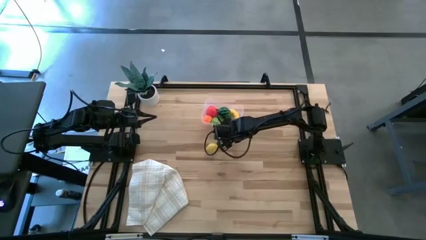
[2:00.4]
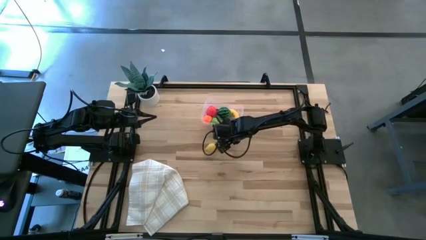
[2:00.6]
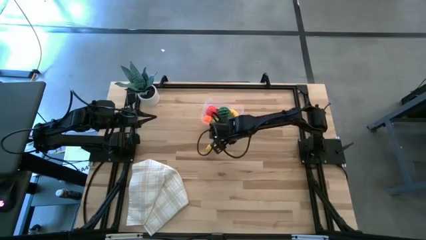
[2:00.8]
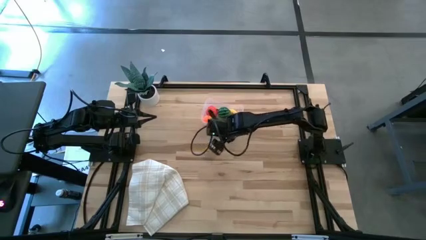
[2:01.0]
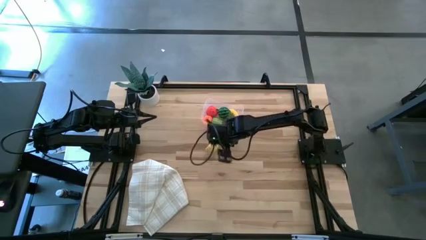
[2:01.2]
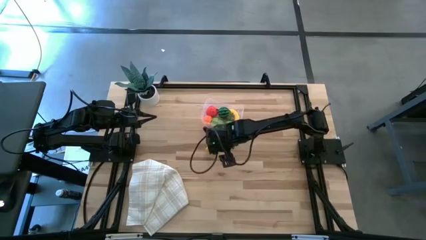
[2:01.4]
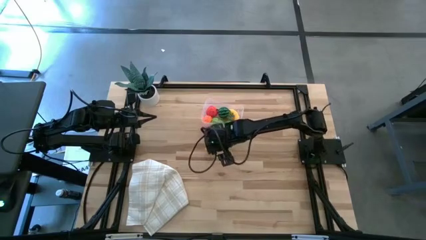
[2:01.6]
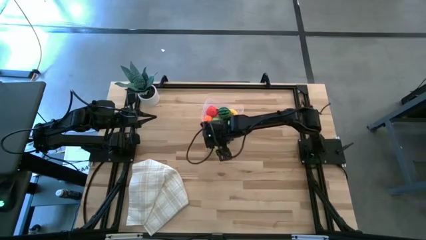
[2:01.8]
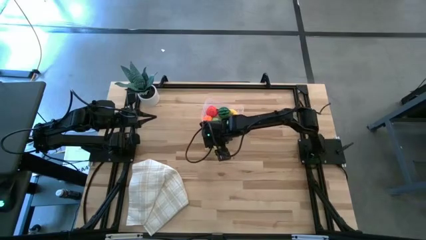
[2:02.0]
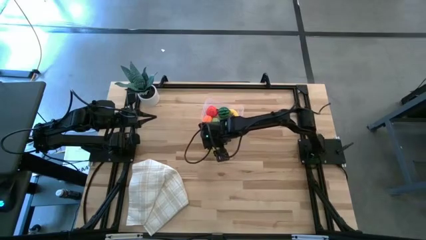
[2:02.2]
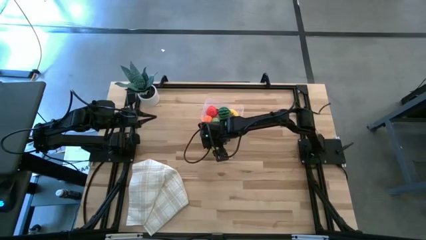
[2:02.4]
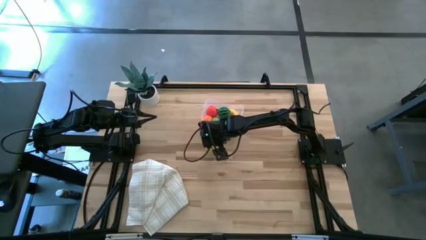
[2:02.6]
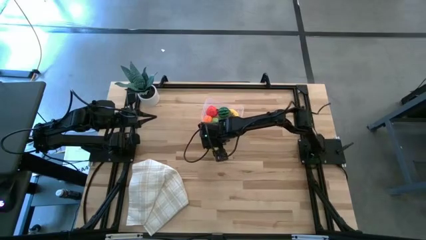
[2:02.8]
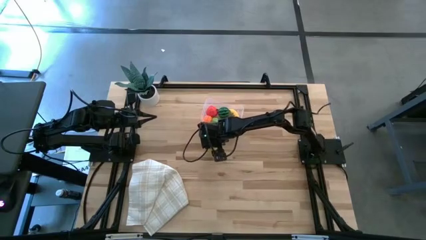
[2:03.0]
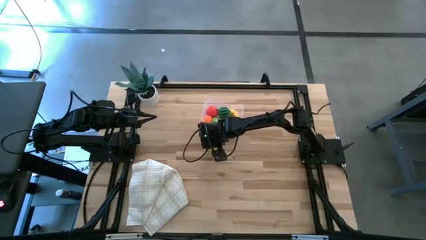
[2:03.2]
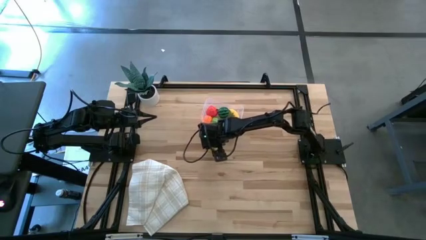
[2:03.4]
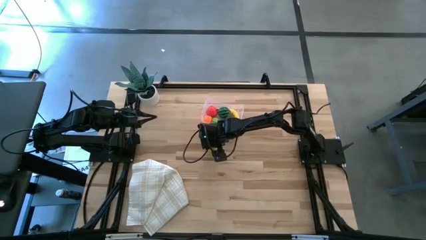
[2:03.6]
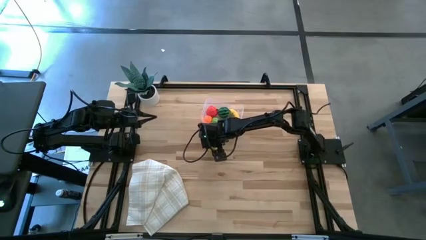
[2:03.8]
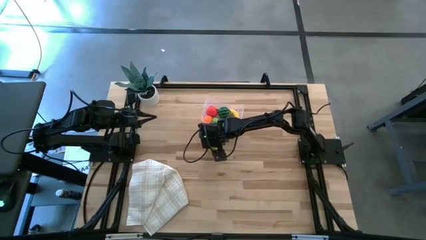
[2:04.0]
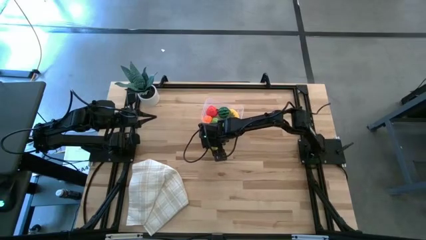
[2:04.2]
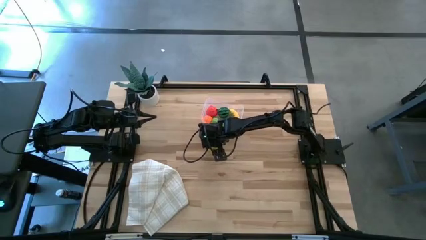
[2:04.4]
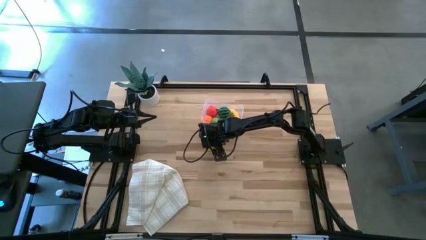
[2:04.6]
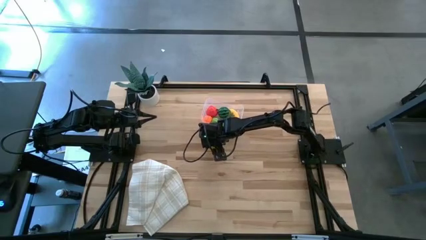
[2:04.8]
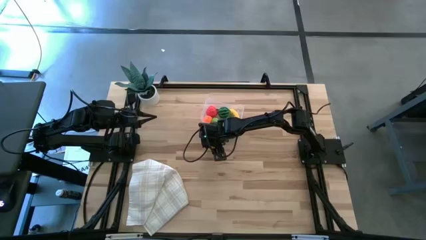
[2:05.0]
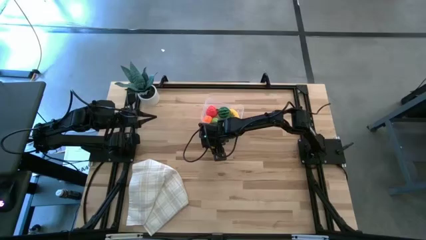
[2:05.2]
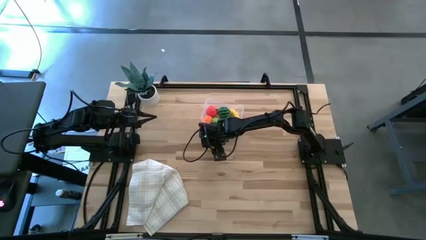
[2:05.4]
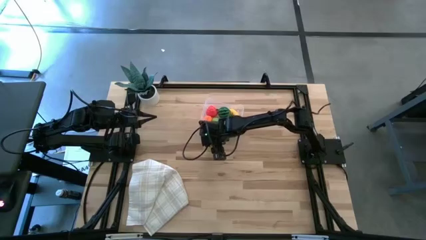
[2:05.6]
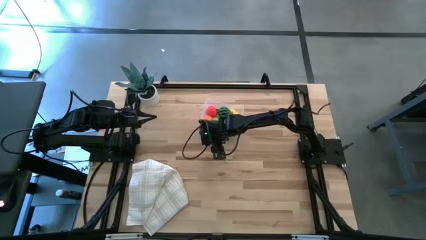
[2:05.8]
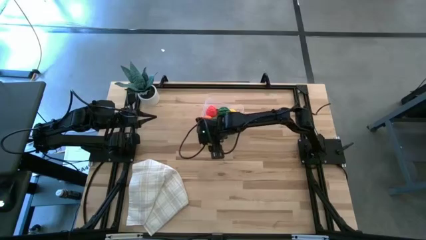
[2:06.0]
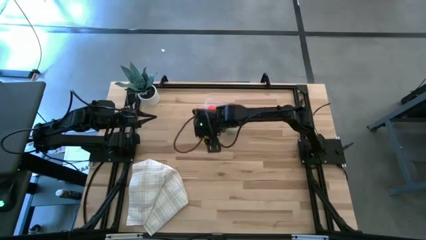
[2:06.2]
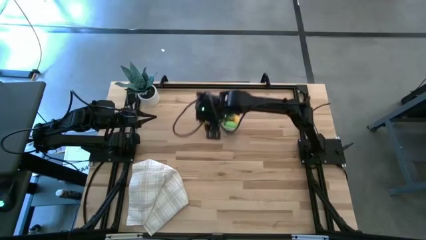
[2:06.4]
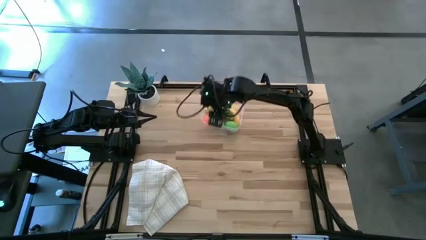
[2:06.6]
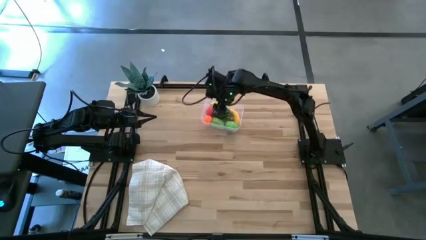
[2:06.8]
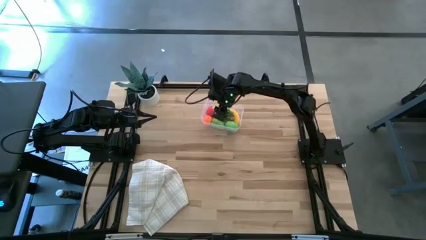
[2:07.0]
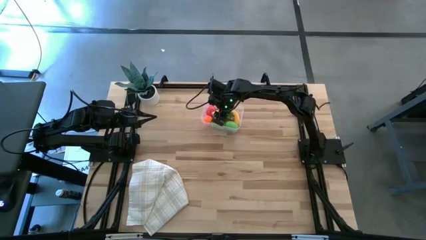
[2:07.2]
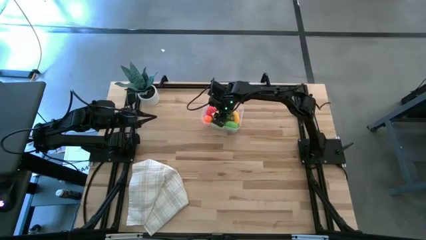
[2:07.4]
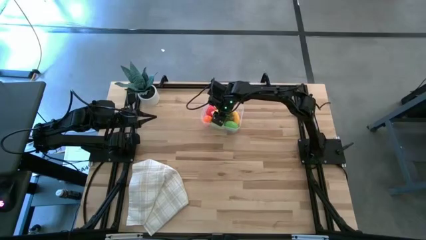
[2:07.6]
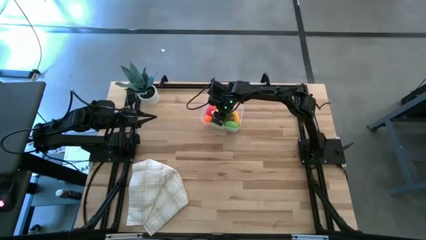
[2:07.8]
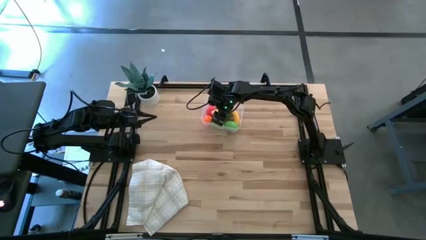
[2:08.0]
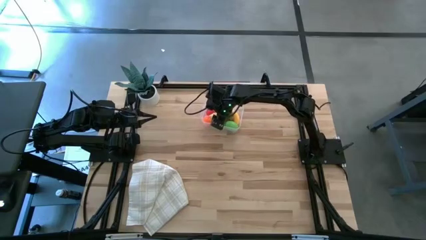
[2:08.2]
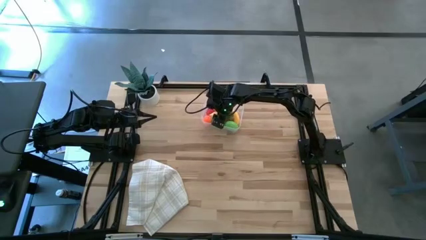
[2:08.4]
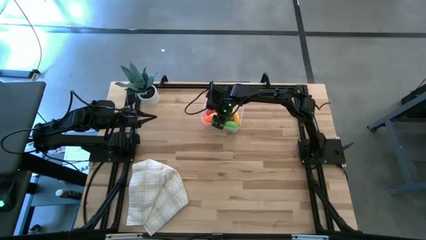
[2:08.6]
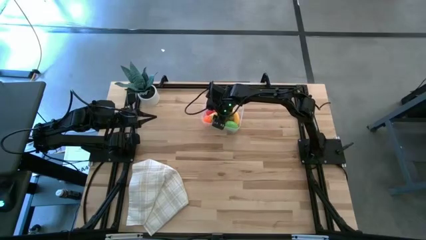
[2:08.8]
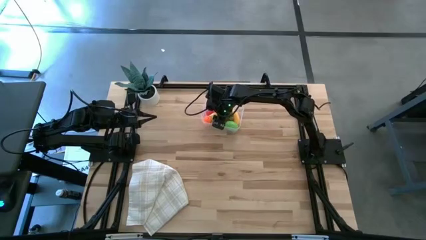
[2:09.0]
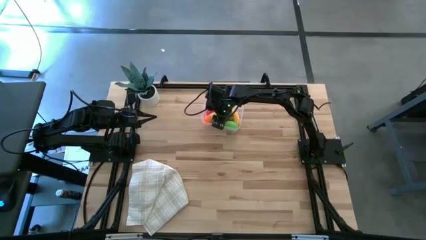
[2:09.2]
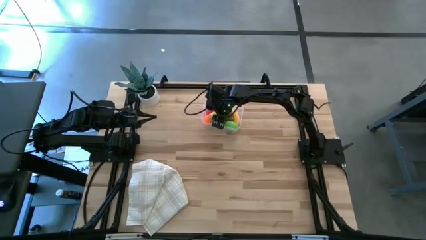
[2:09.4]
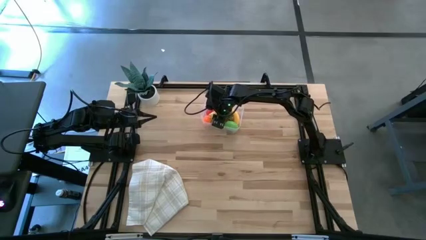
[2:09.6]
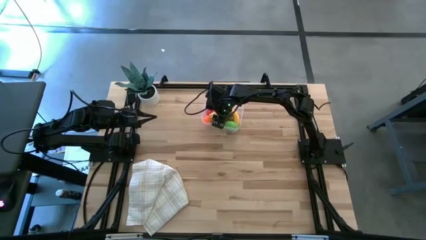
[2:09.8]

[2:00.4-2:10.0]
Task: Pick and placing Produce into tupperware
Put the lemon into the transparent bin

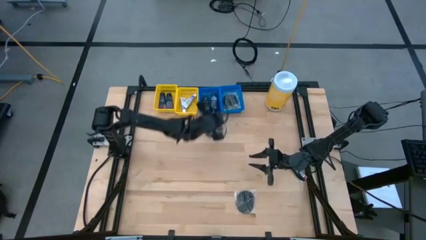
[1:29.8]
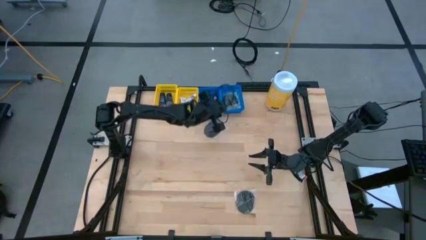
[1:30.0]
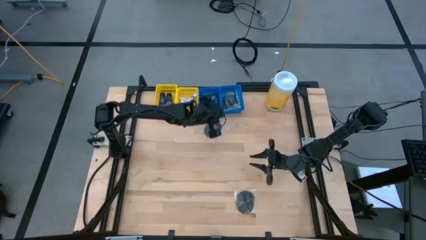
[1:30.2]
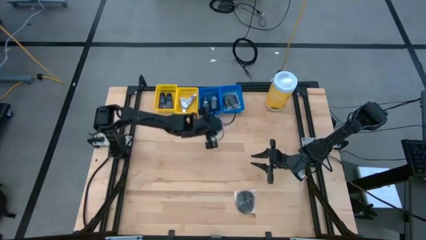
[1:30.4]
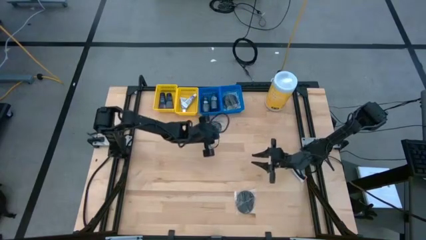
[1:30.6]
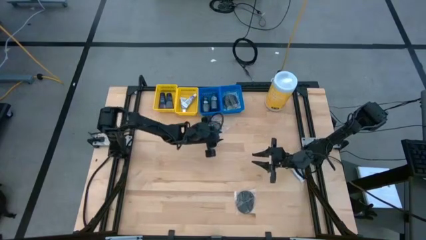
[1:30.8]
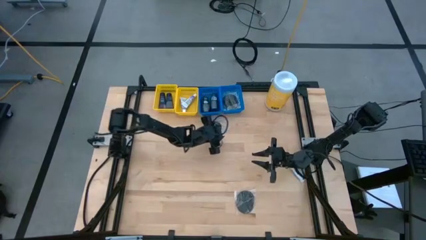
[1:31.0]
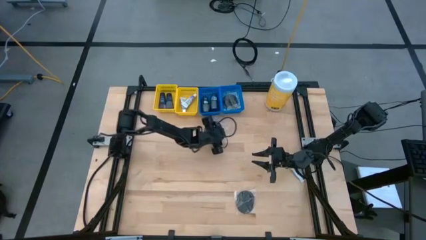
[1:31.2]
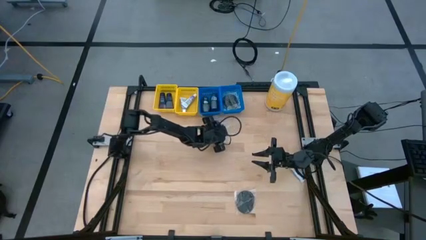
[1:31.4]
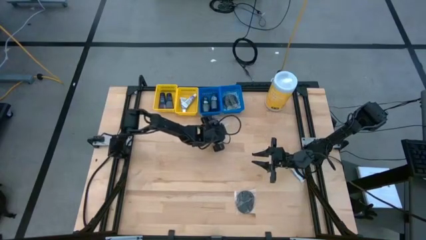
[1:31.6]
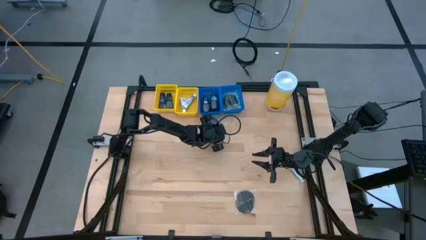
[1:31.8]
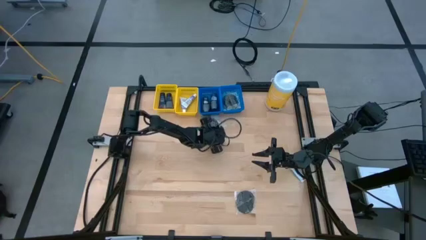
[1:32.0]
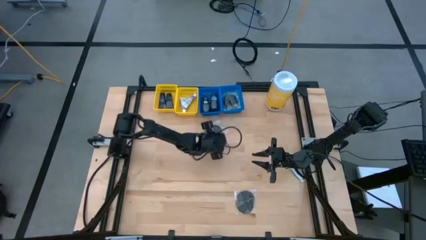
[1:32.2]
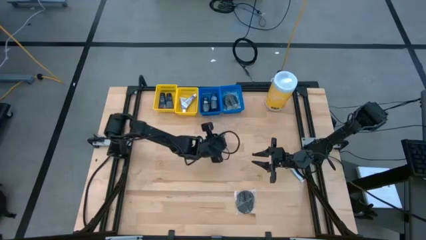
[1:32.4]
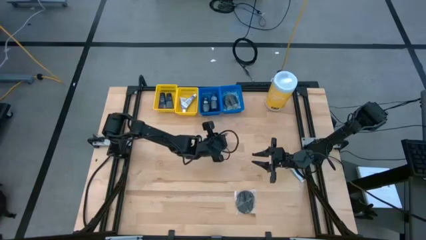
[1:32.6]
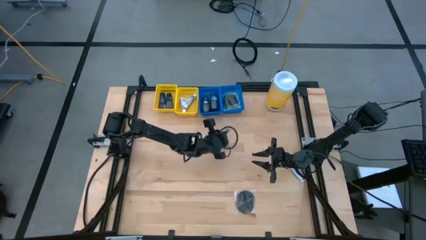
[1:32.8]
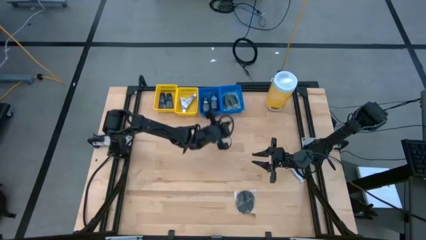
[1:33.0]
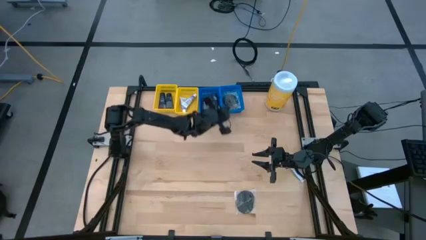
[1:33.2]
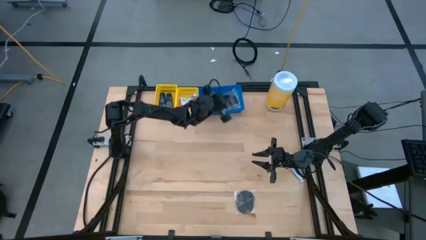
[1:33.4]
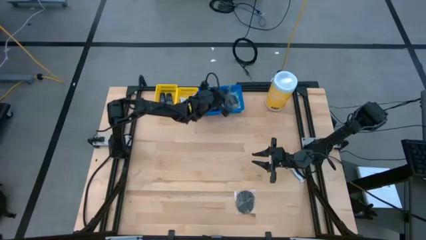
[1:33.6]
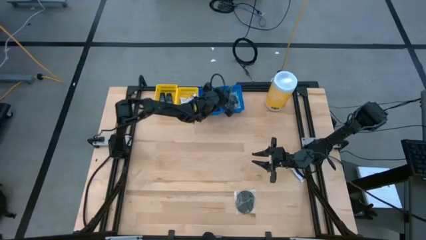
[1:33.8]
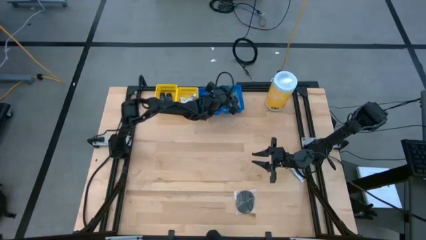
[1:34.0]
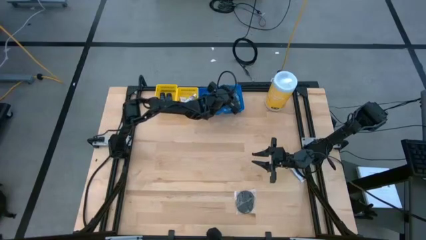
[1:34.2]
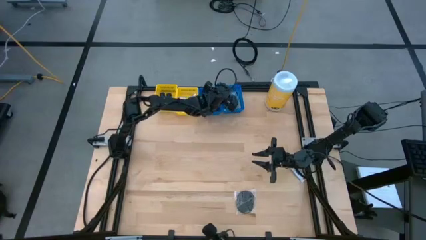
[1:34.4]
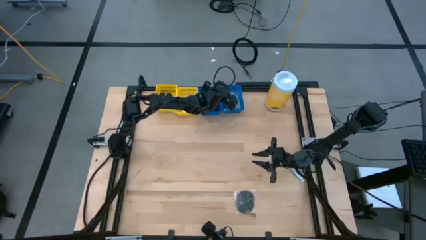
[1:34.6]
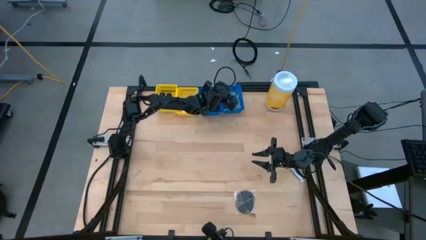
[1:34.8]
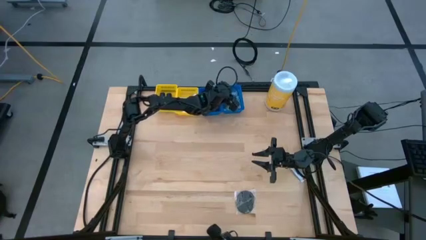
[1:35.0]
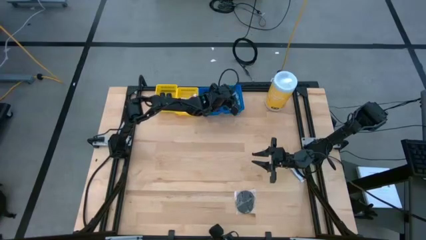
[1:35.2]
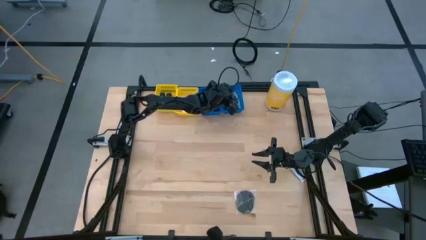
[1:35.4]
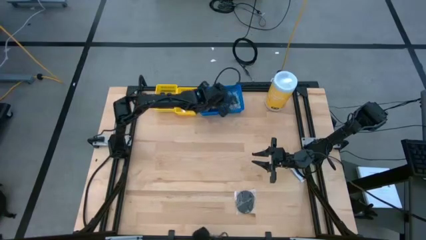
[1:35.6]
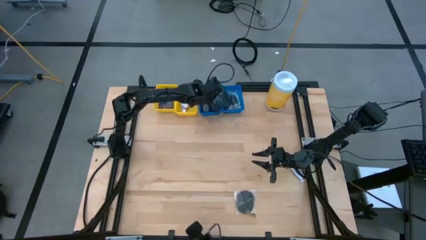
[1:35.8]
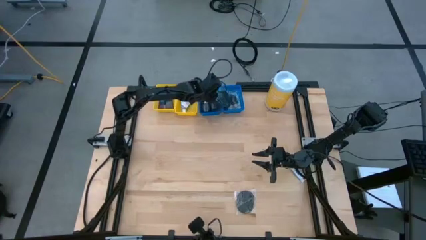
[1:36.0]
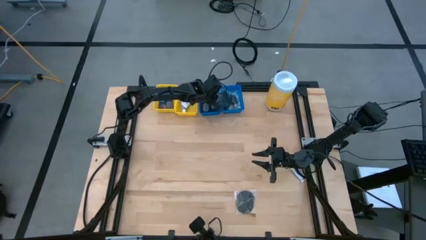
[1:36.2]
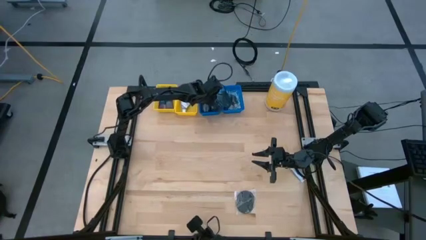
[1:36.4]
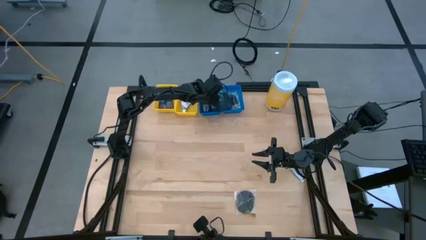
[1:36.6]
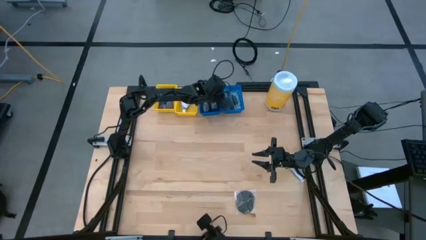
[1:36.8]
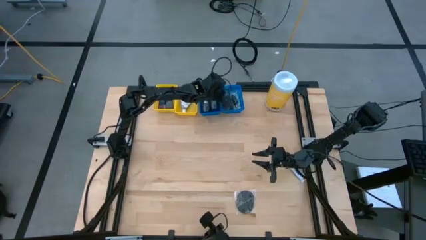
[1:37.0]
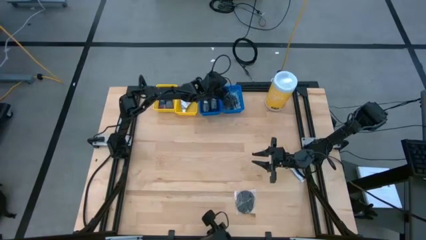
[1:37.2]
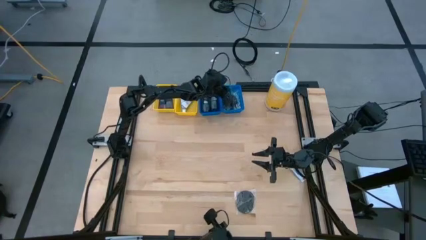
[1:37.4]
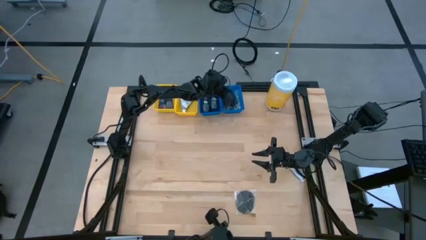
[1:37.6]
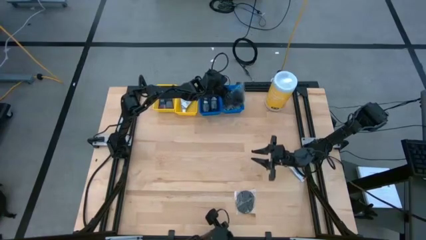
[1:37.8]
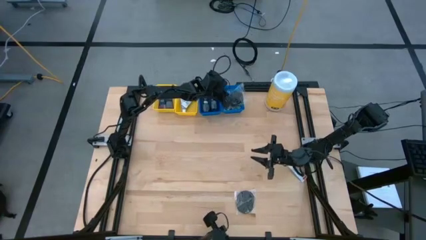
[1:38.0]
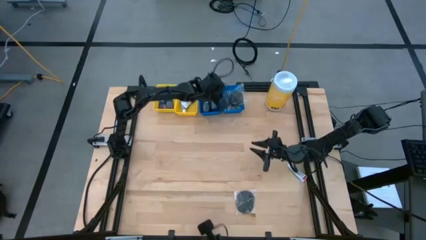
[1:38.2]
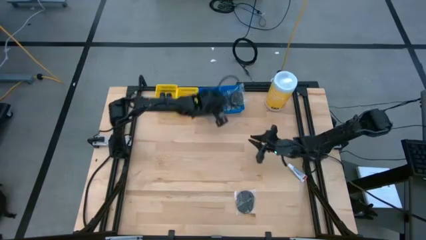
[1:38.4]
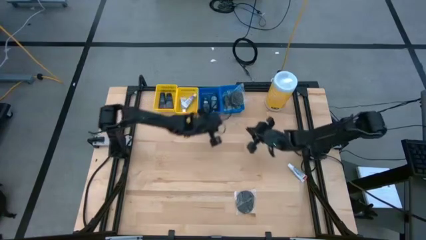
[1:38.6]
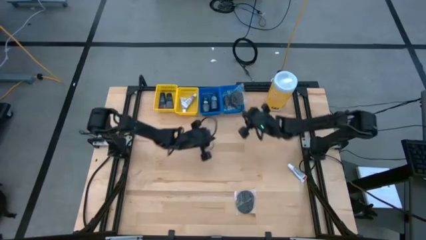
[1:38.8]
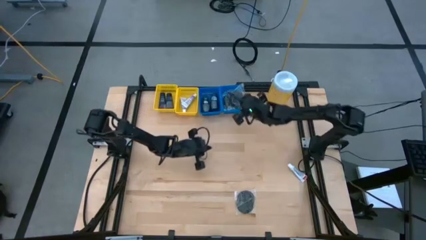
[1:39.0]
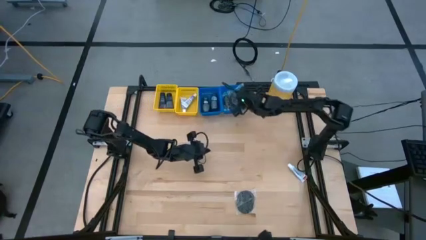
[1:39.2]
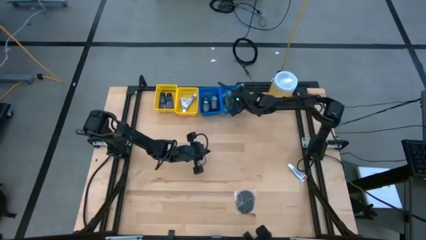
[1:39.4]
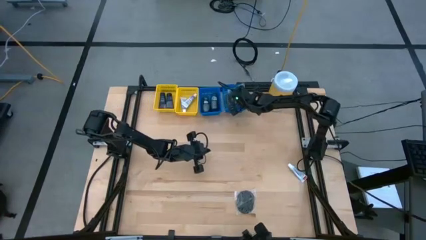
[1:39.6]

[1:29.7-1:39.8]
Task: Pick & Place Travel size toiletries
Put the black hairbrush into the right blue bin
